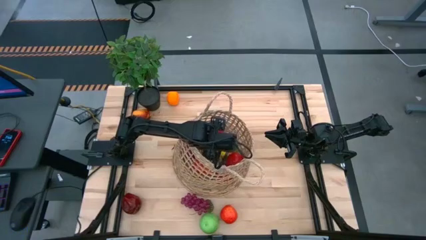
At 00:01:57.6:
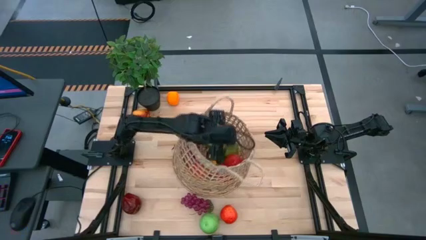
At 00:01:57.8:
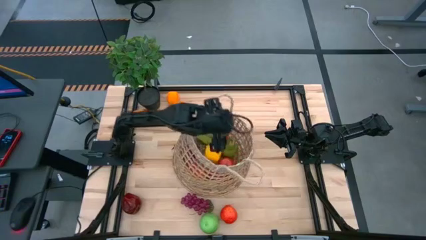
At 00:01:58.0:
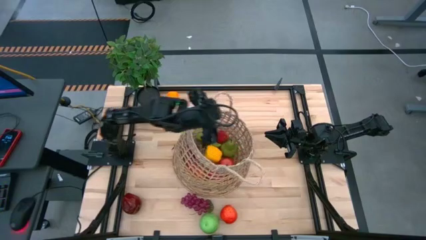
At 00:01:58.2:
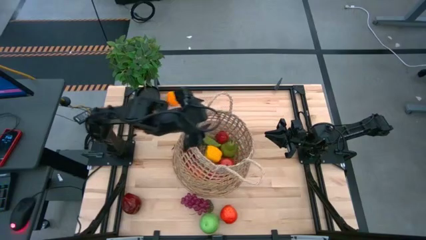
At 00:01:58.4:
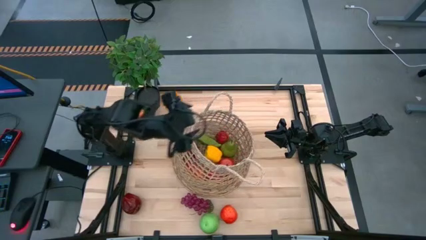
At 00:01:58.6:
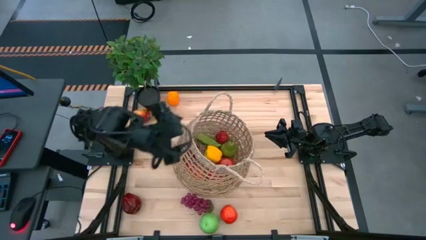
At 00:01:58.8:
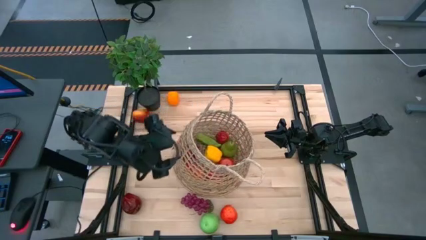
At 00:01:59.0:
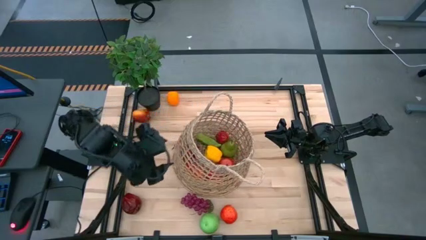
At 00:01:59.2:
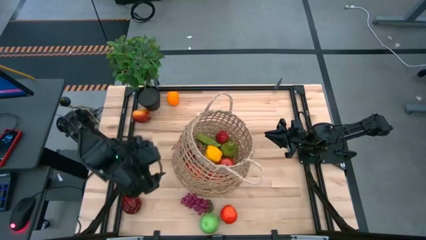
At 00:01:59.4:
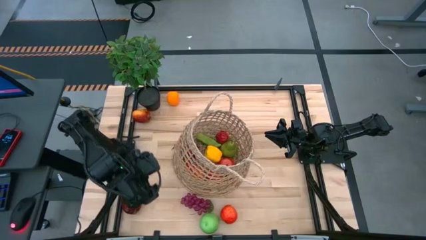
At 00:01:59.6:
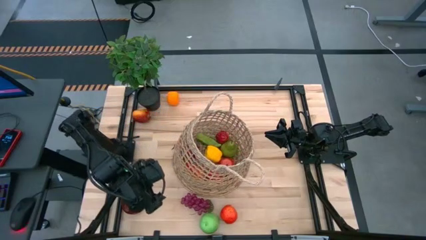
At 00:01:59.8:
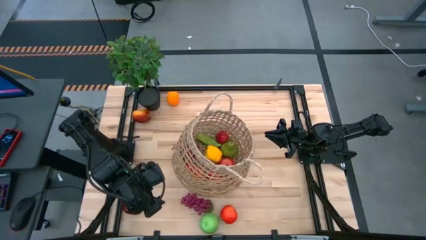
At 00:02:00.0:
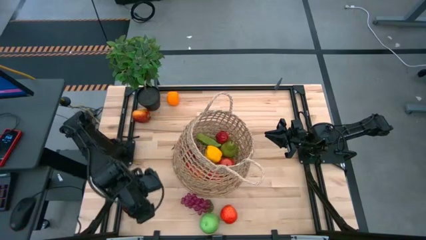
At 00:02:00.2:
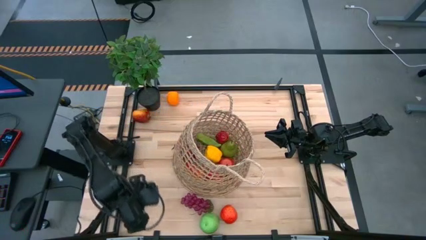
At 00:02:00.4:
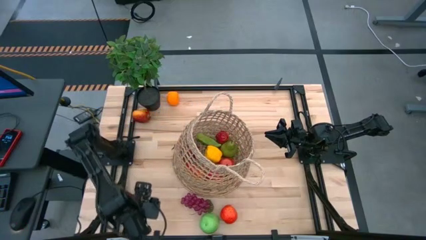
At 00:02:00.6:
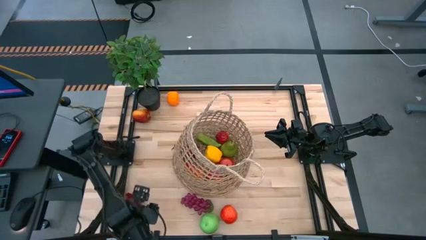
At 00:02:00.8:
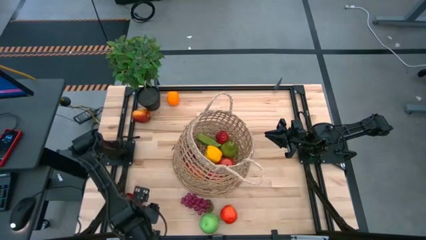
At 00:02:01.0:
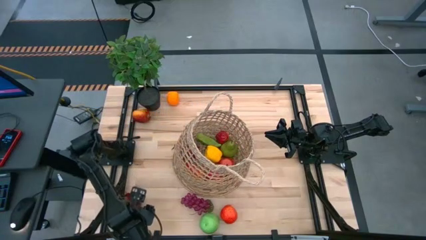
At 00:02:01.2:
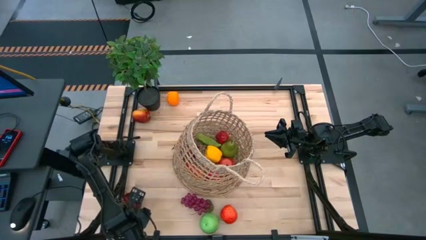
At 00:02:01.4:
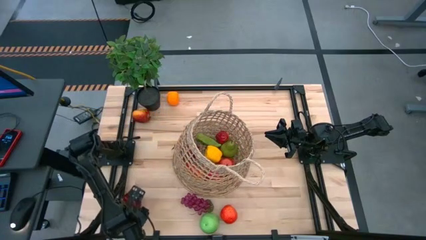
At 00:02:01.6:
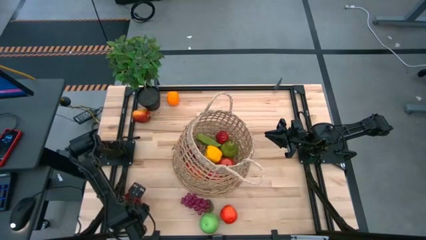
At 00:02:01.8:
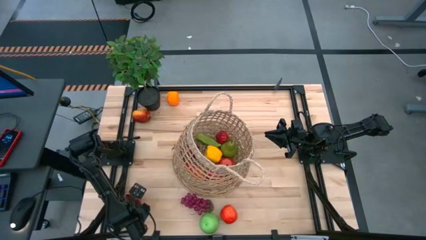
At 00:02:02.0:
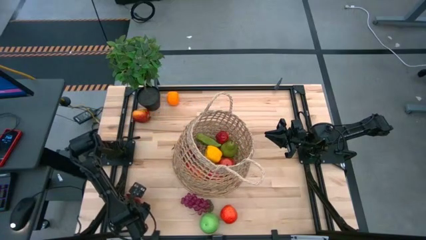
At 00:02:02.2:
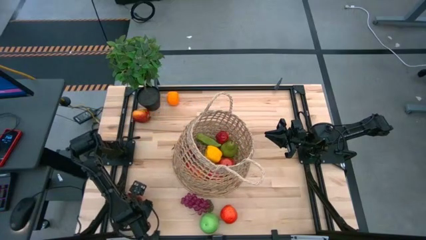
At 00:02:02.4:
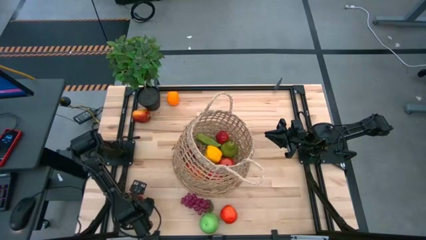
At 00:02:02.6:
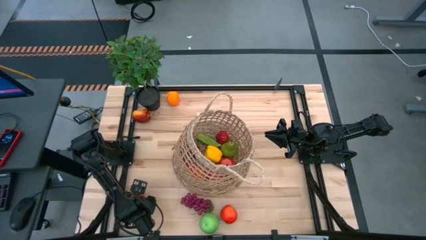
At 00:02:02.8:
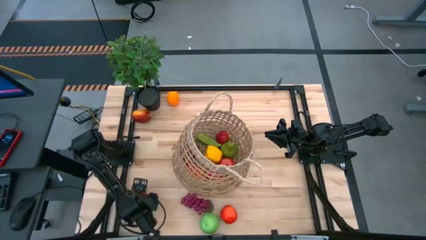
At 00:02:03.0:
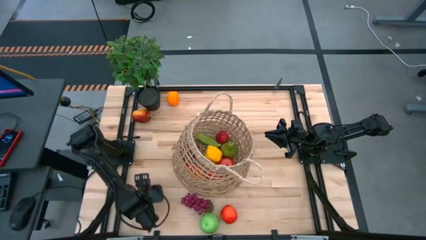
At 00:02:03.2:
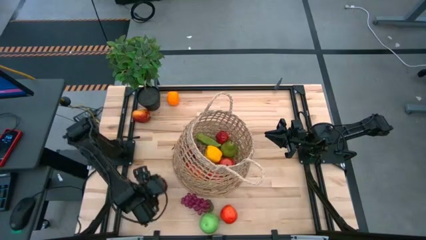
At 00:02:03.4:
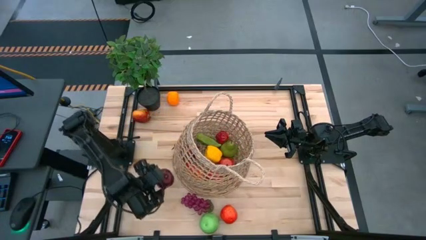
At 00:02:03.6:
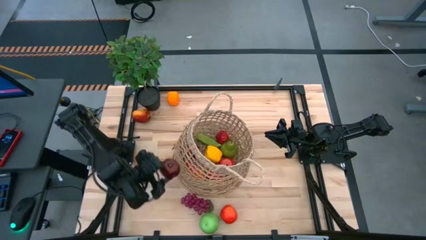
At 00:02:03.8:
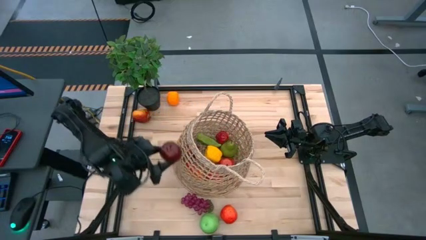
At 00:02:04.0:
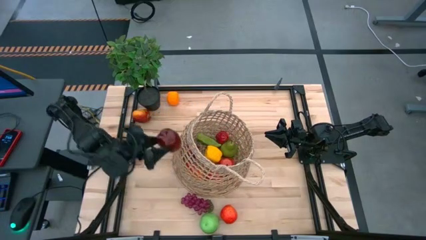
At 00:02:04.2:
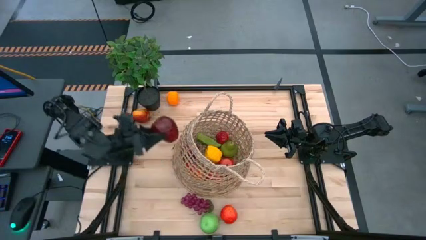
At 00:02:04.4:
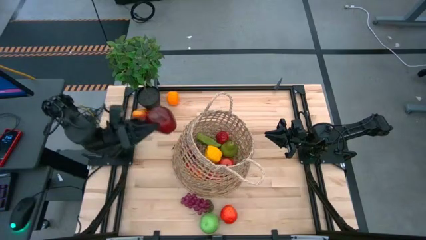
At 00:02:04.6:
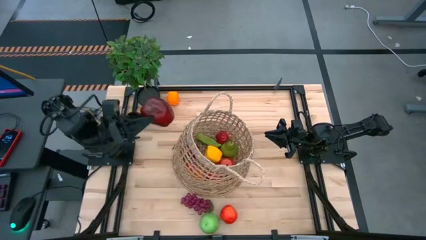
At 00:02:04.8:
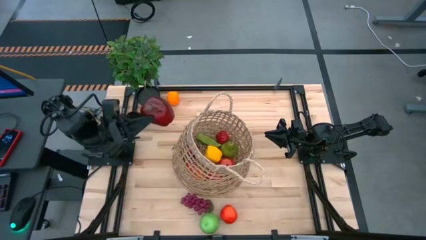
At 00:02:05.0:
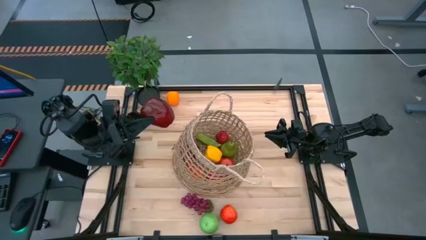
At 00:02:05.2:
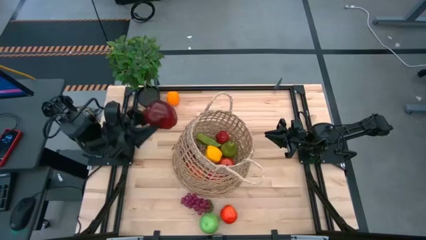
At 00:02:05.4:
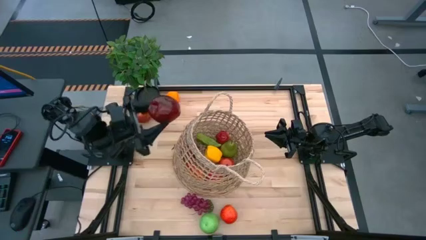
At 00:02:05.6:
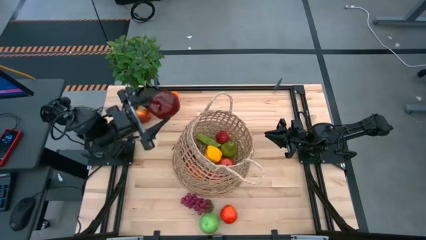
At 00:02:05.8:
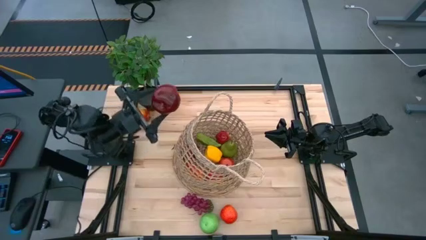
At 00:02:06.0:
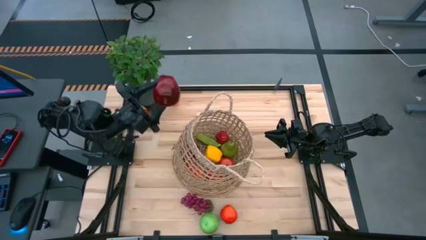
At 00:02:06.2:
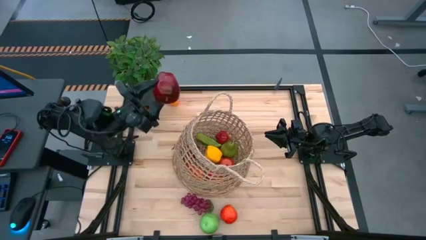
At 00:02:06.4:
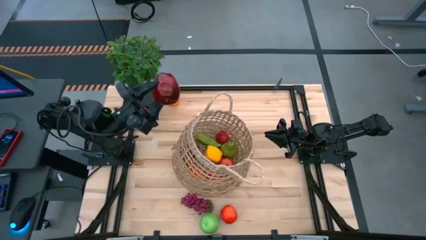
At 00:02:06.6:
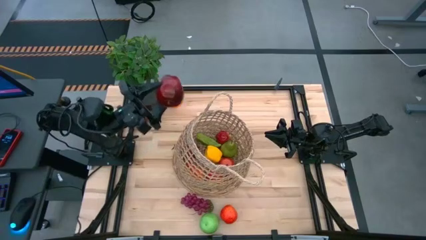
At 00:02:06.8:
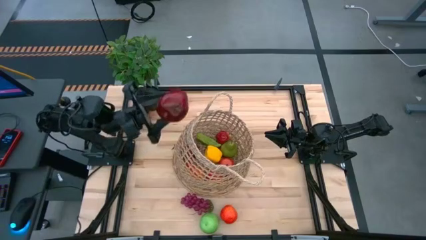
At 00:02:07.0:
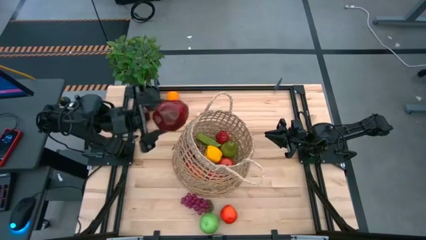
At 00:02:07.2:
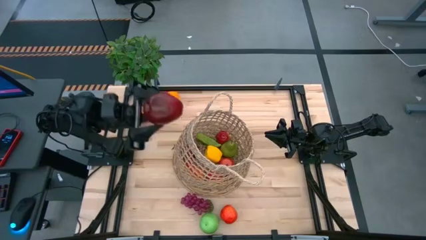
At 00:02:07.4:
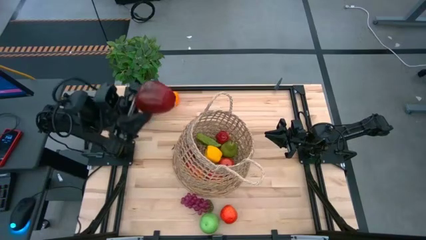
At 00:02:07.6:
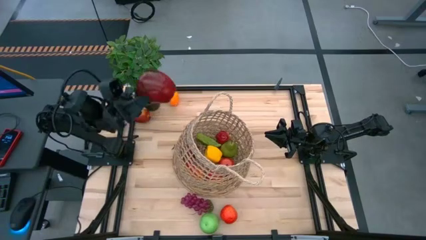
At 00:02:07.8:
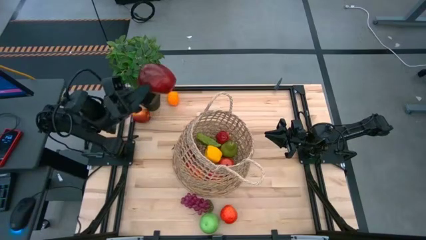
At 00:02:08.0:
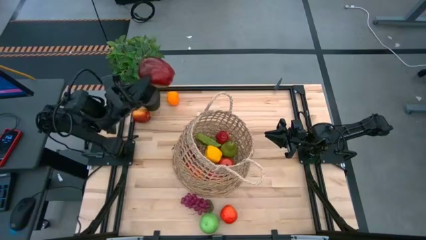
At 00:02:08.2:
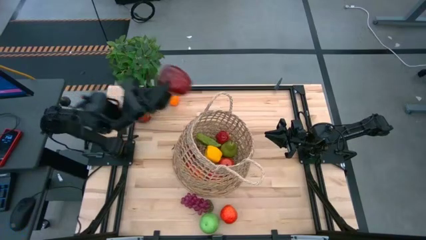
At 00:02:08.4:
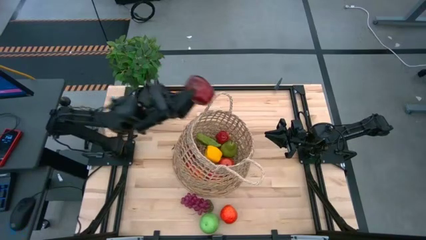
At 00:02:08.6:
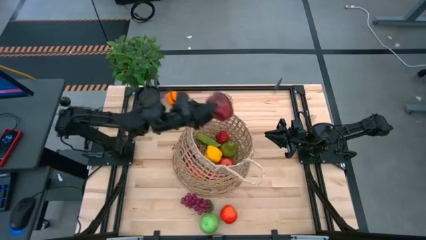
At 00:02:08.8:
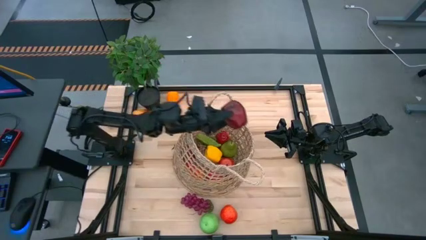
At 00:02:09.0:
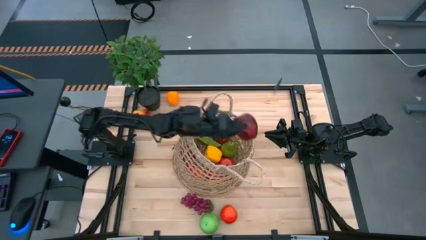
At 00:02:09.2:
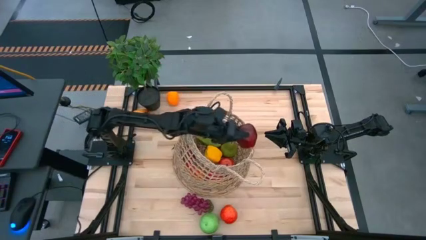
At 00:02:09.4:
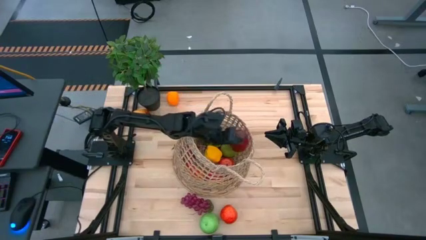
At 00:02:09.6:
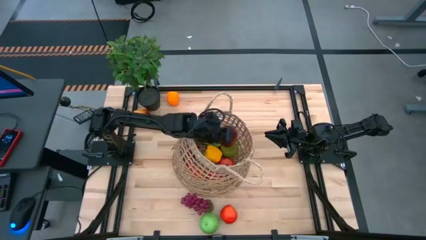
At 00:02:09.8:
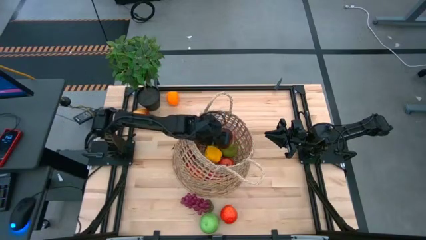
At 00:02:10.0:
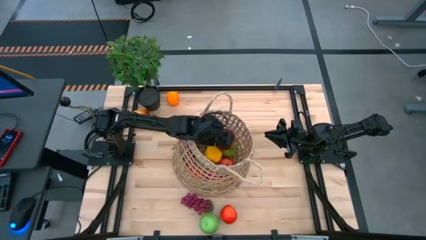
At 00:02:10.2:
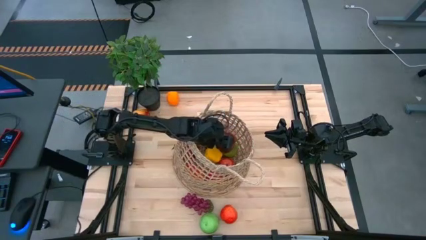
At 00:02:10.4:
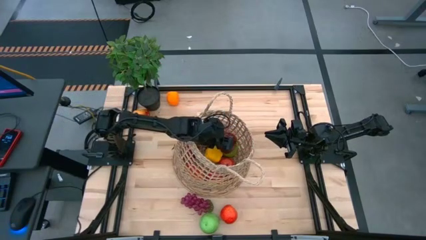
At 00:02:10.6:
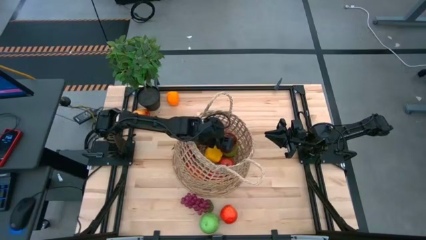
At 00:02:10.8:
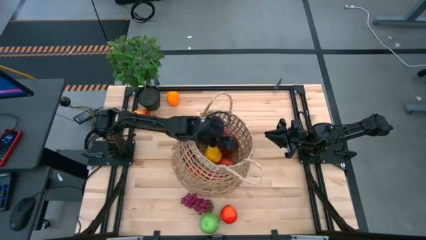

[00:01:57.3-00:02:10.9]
Task: Build produce basket
Put the apple into the basket

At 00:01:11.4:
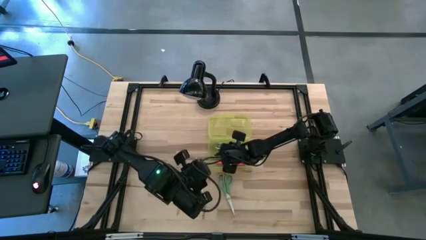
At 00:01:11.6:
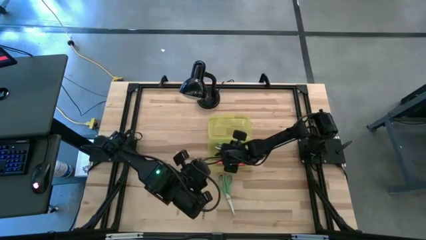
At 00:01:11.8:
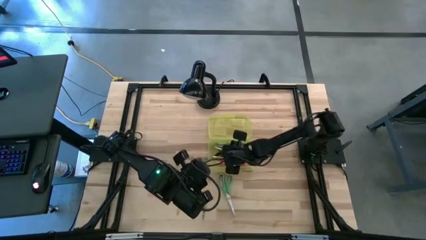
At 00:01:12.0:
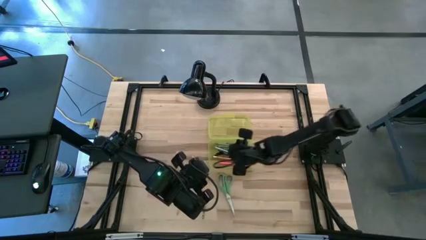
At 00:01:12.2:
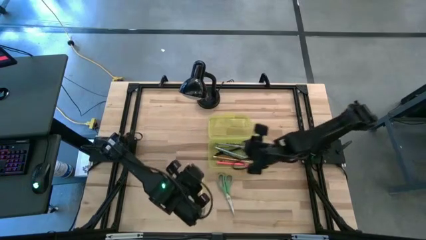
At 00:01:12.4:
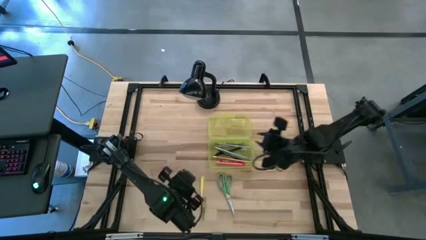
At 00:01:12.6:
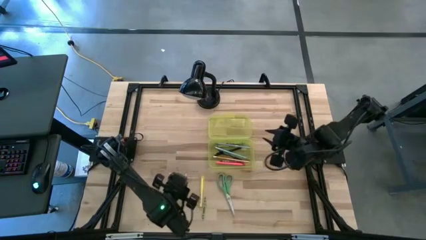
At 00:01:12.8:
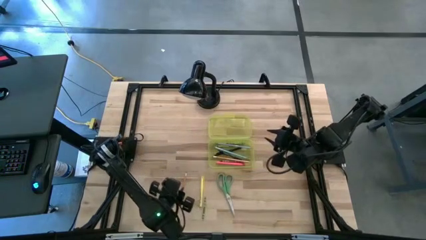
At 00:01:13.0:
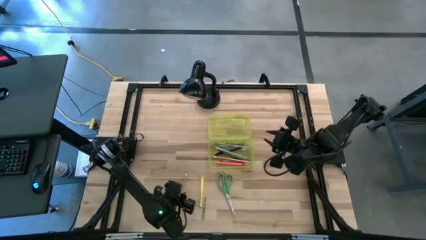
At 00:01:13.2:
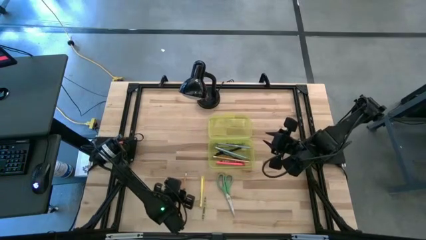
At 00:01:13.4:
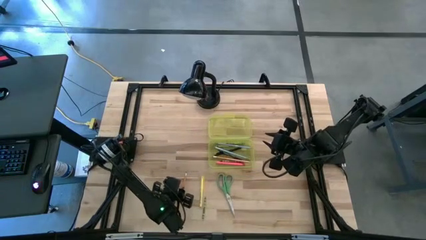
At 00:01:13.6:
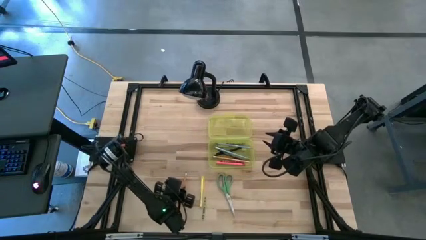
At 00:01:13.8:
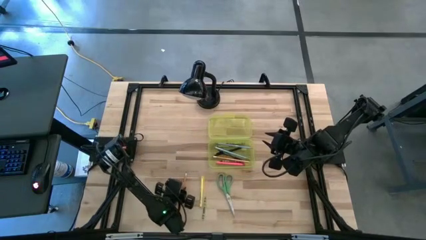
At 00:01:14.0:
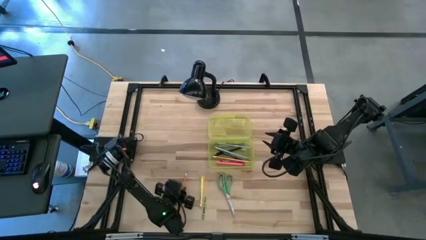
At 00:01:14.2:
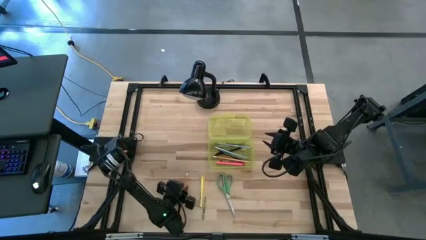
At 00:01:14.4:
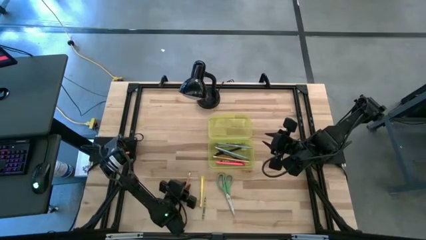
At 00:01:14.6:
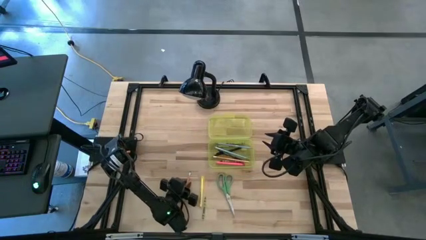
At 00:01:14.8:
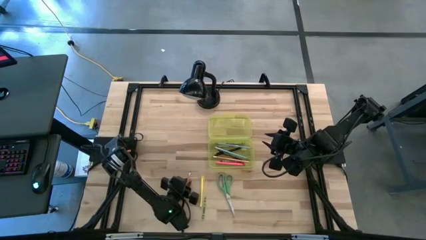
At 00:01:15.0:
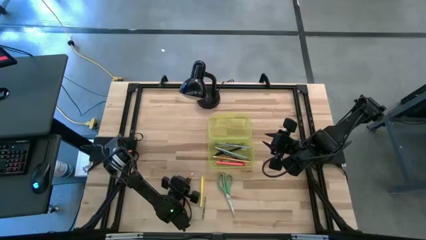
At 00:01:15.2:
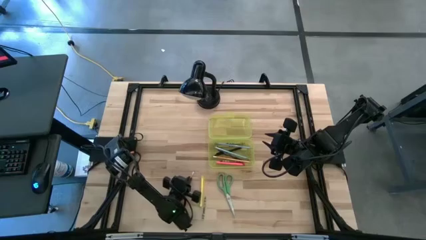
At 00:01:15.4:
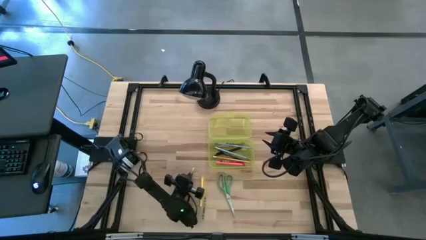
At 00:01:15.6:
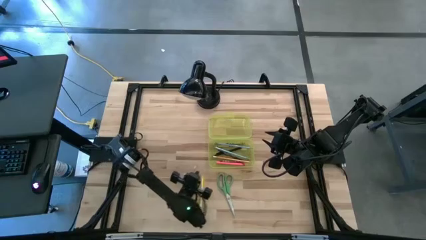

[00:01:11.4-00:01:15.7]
Task: Pick & place school supplies into a supply box
Put the yellow pencil into the yellow supply box
